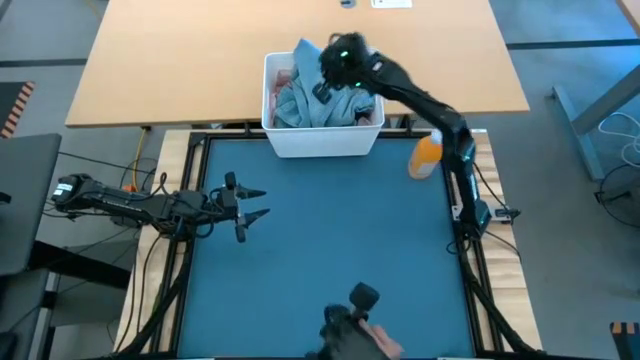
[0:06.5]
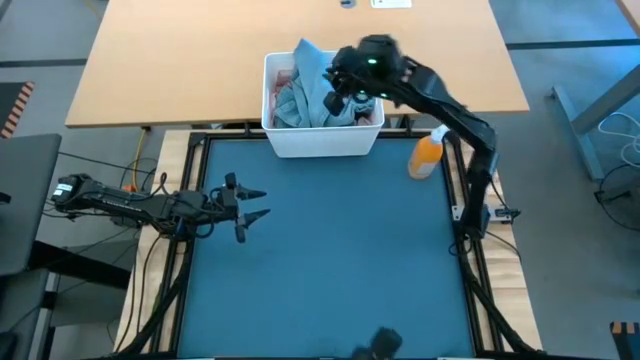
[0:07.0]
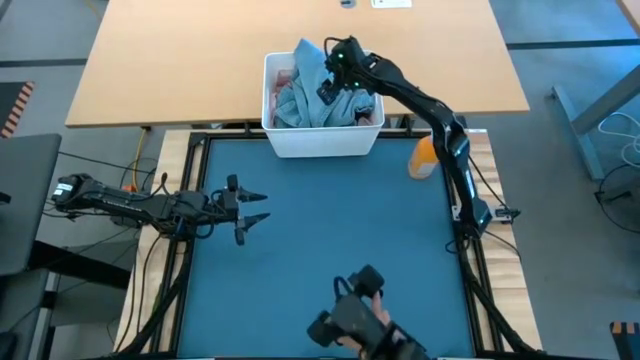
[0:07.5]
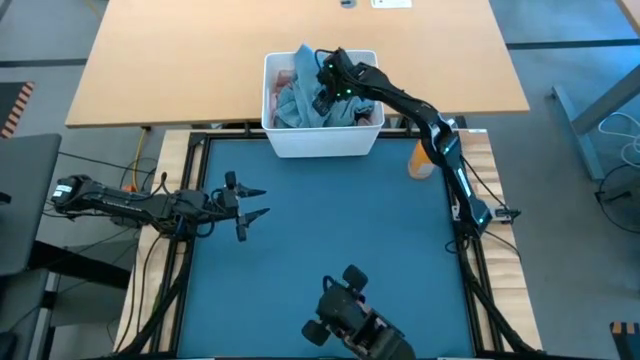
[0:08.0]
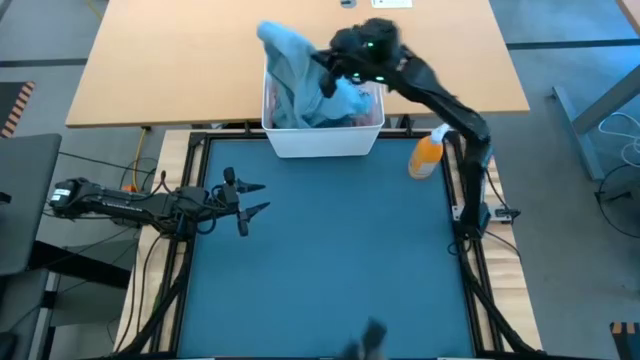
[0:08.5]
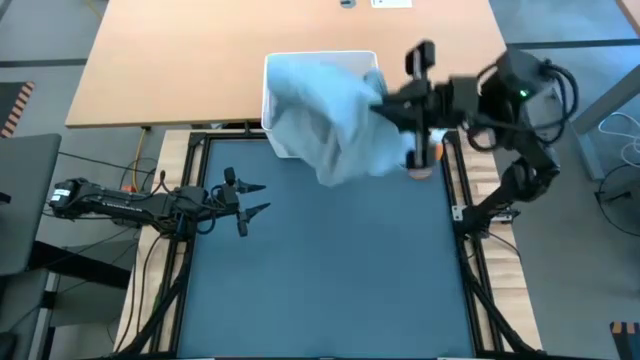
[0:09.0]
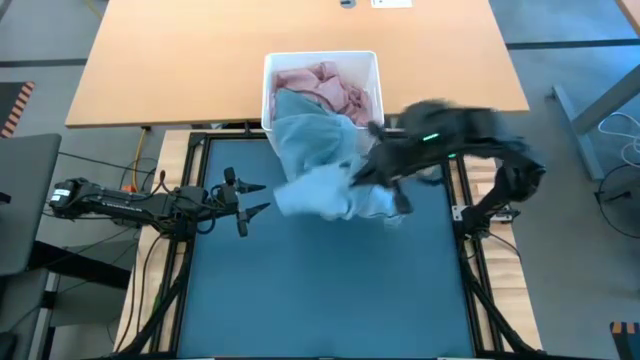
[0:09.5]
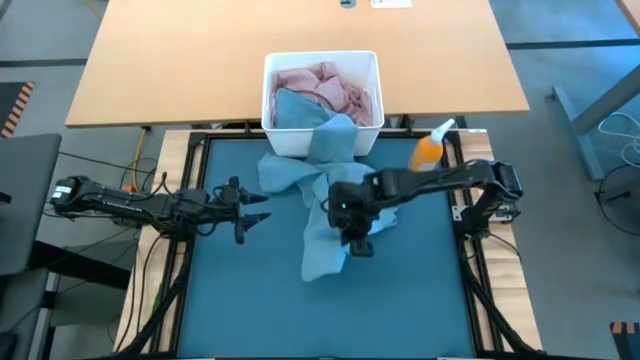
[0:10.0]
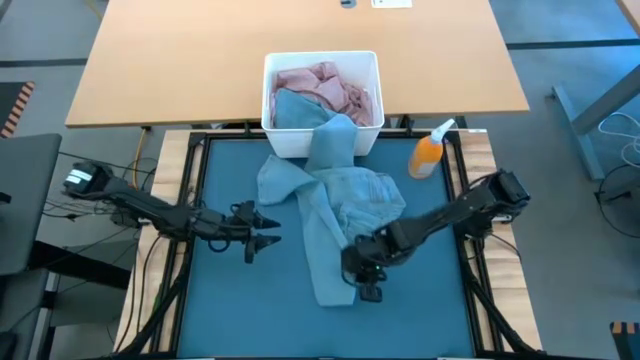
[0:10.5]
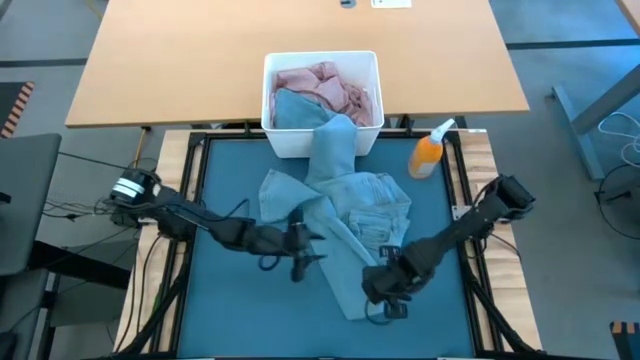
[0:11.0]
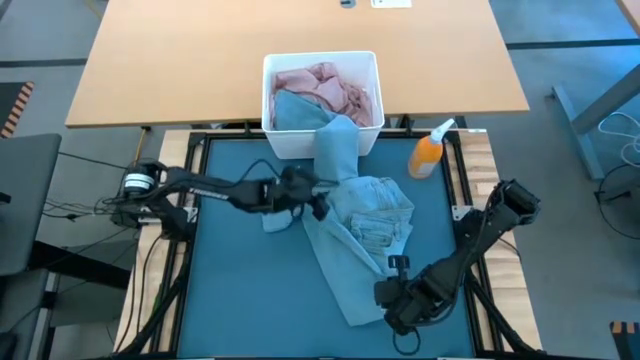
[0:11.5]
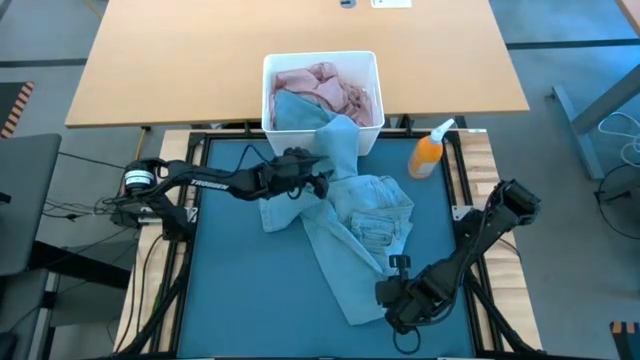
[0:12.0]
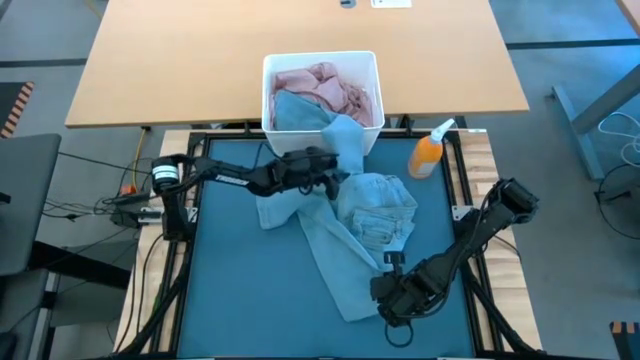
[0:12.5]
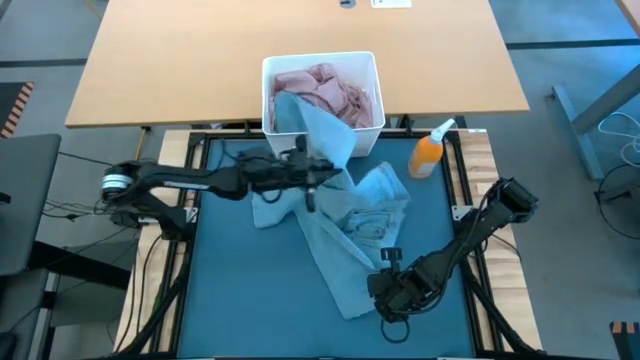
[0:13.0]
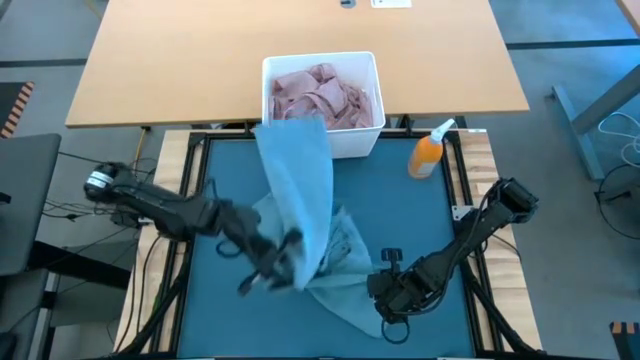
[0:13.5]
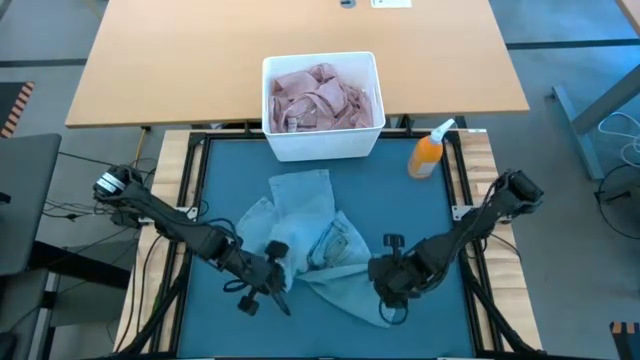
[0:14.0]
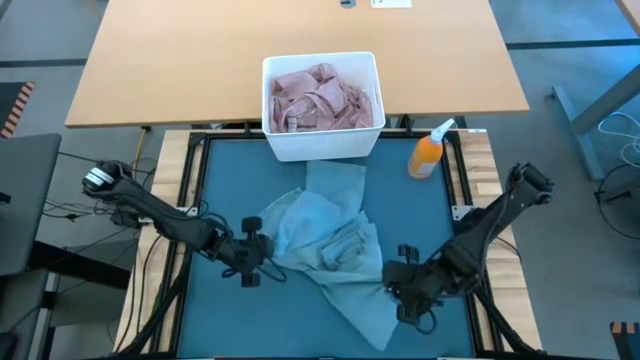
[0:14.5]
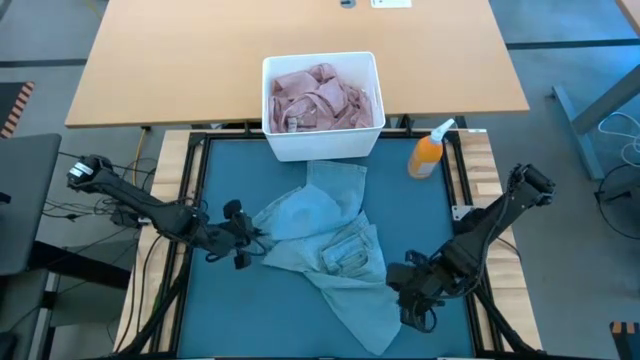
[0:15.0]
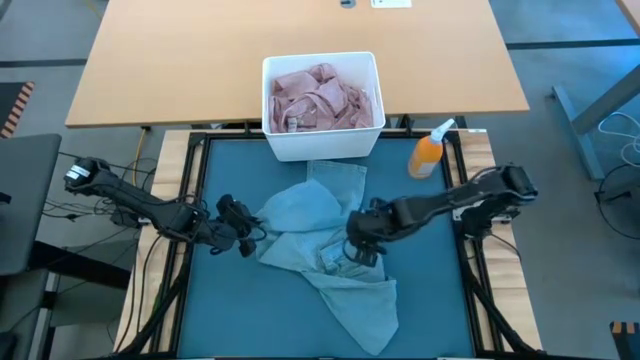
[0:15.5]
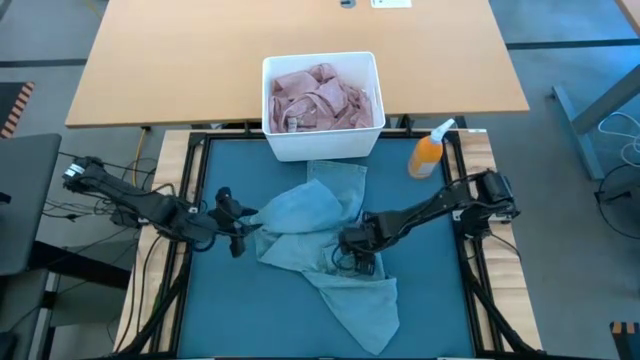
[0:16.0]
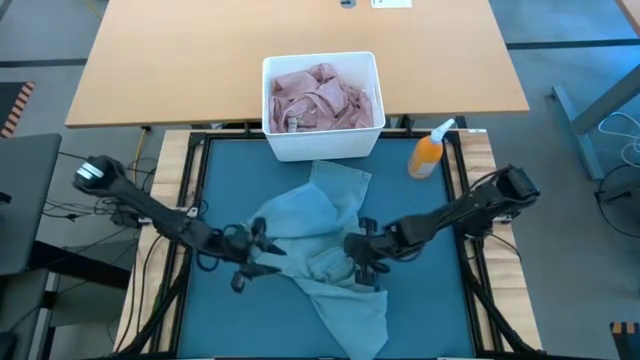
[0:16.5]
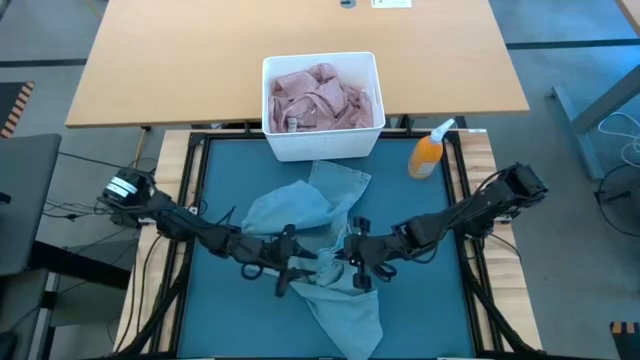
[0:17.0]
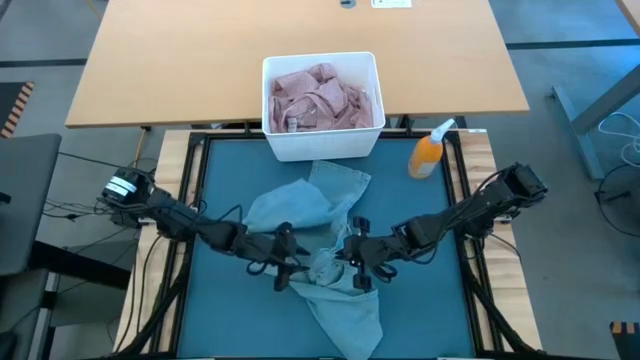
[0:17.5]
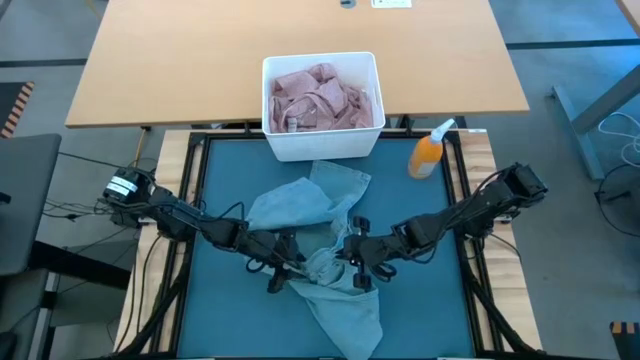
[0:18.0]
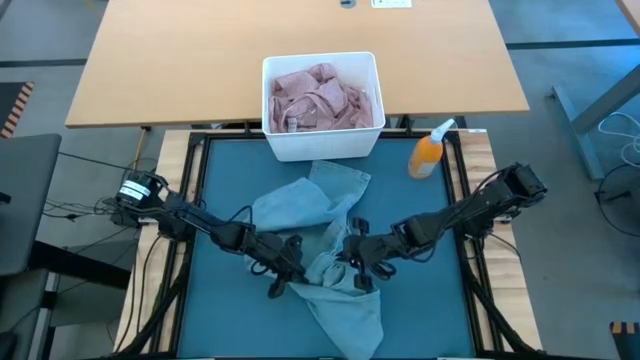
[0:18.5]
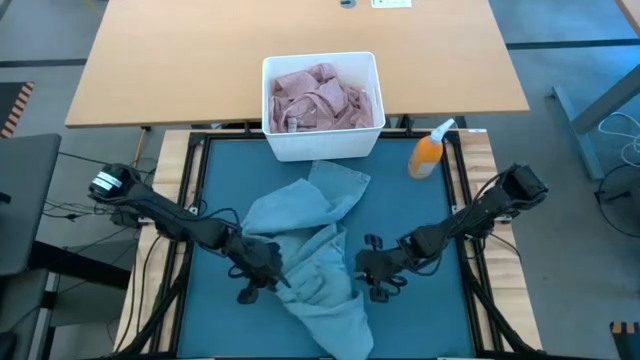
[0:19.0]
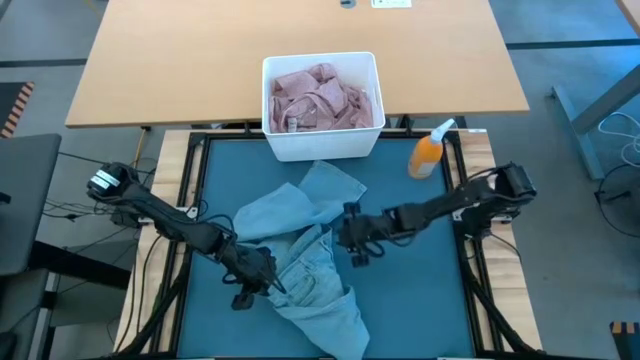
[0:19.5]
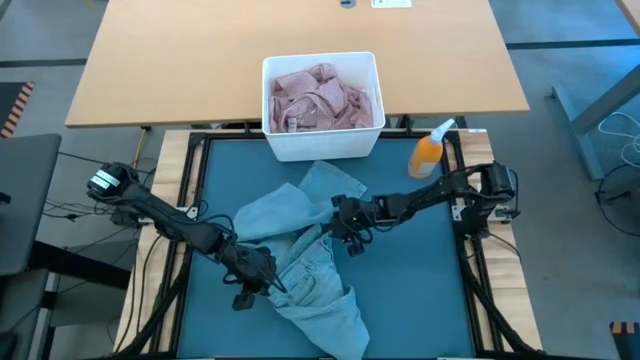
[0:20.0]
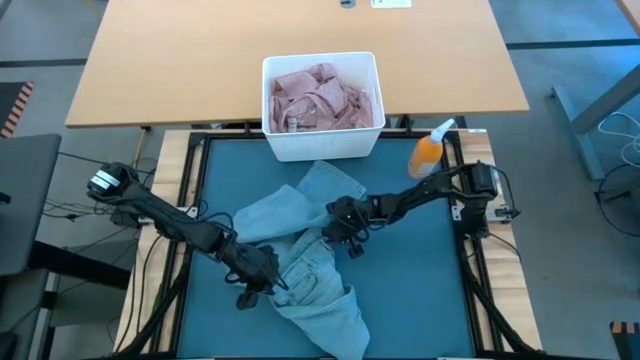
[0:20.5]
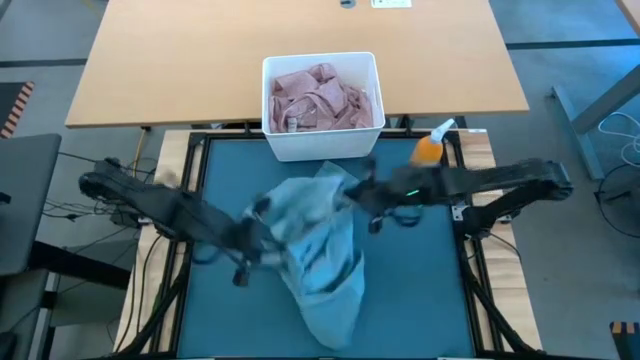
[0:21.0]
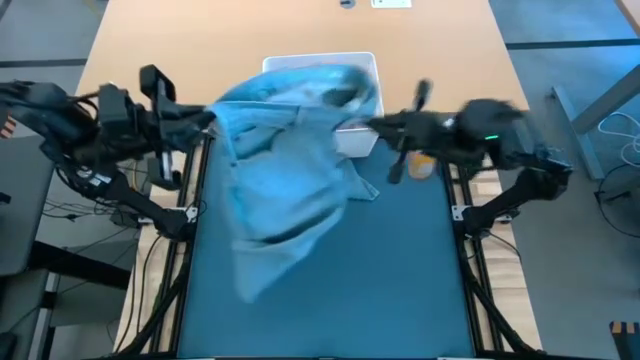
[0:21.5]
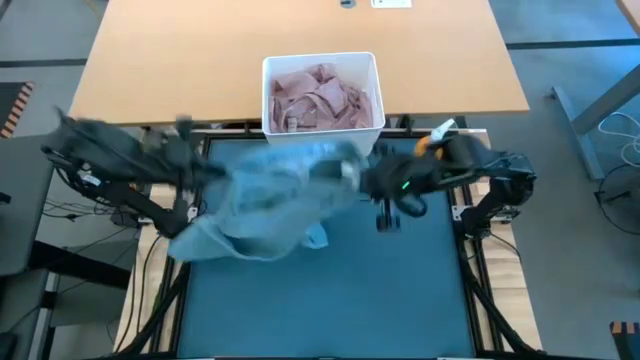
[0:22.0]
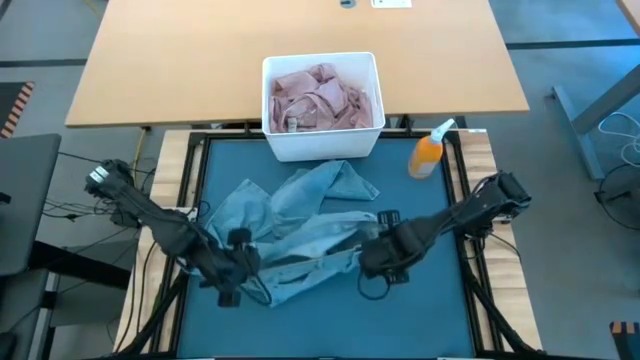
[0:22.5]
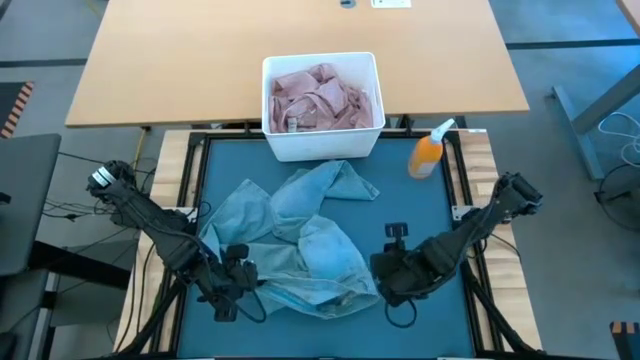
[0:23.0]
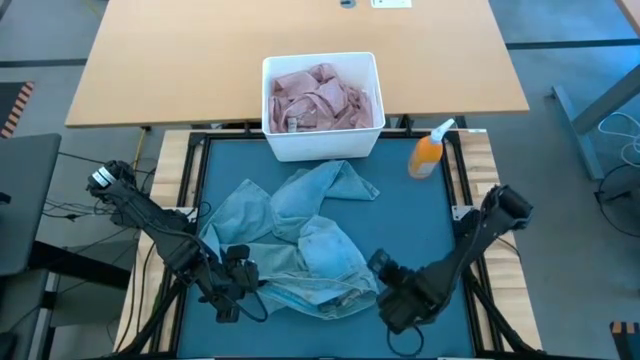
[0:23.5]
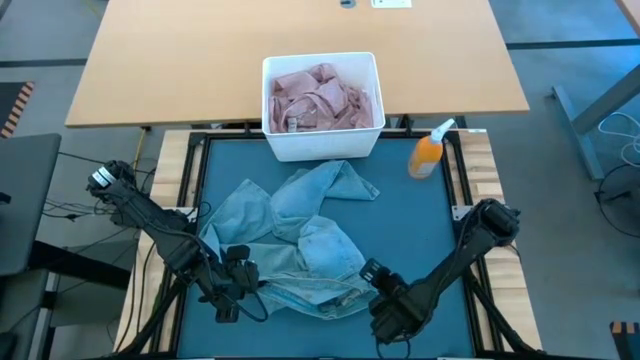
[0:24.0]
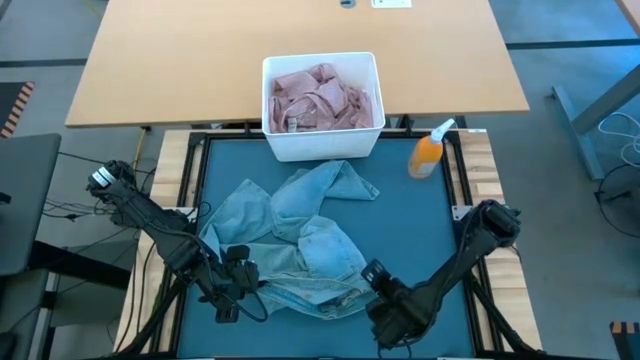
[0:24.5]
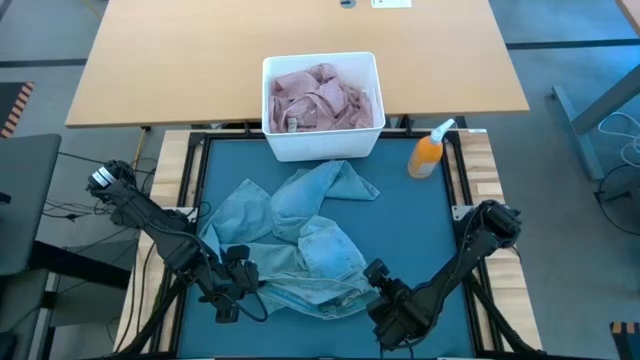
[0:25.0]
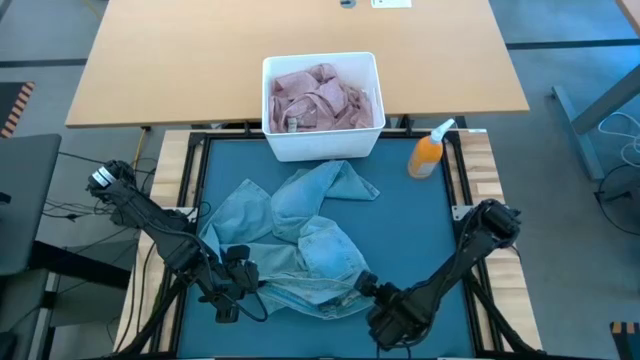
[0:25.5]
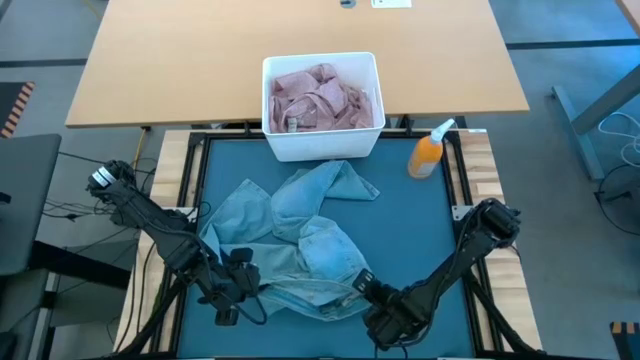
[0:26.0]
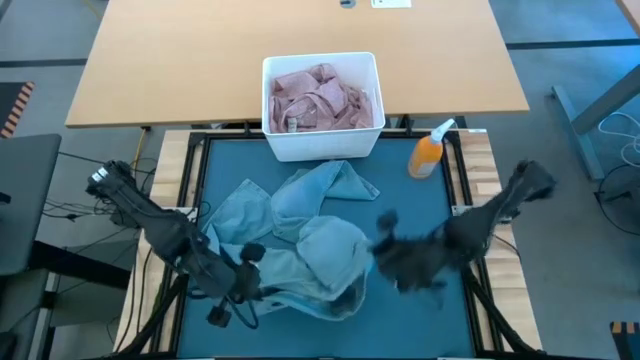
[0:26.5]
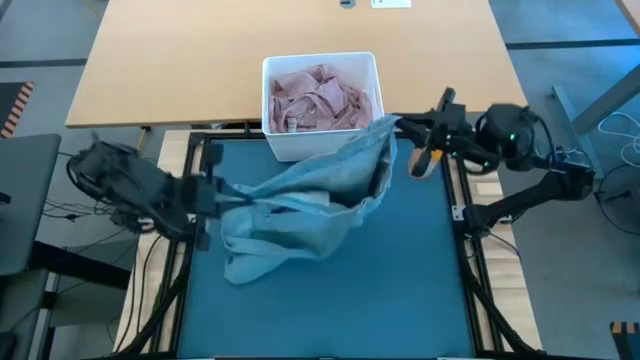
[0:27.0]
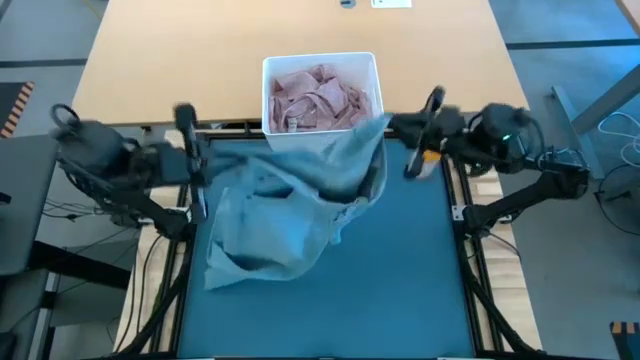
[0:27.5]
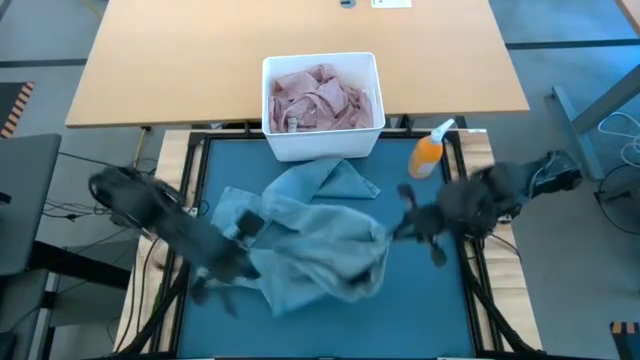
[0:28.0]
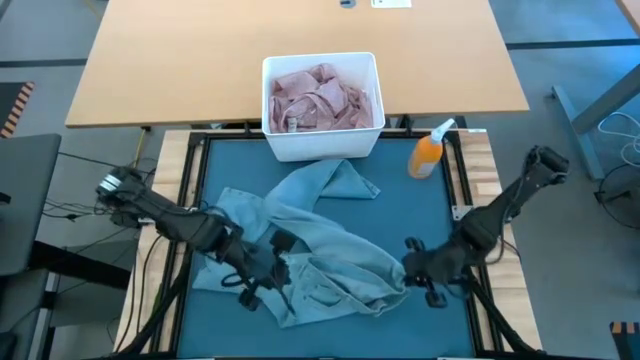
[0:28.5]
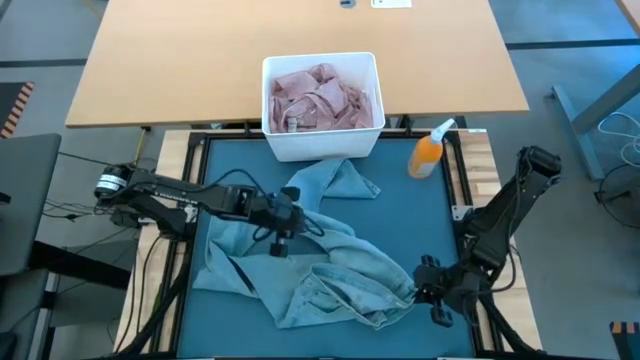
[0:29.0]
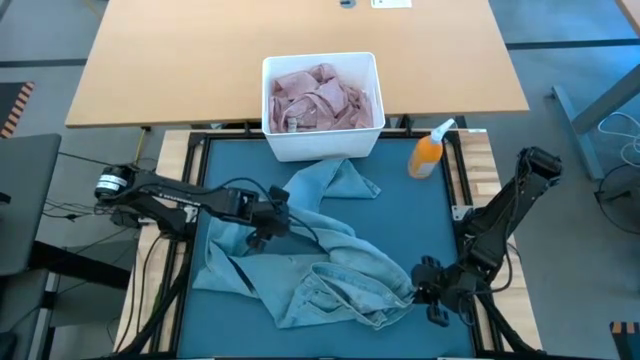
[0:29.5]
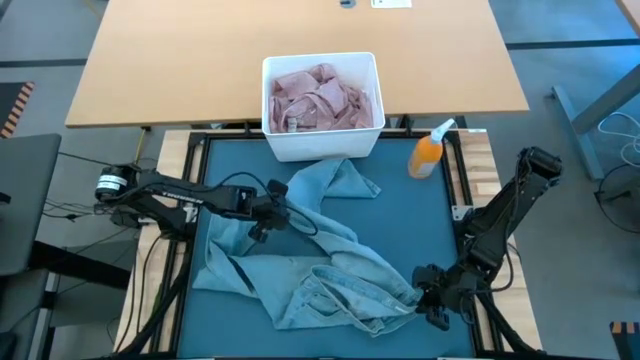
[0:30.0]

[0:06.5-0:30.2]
Task: Fold Laundry from Bin
Fold the blue pants
